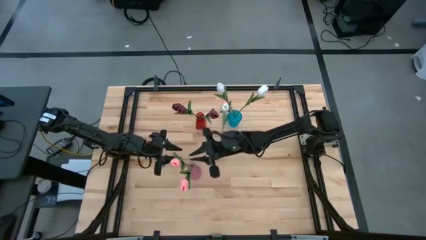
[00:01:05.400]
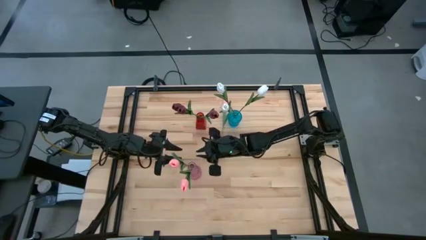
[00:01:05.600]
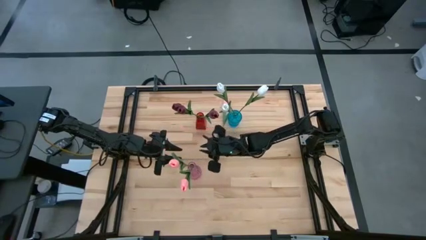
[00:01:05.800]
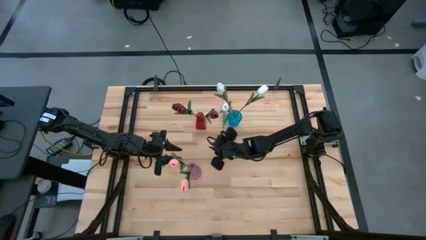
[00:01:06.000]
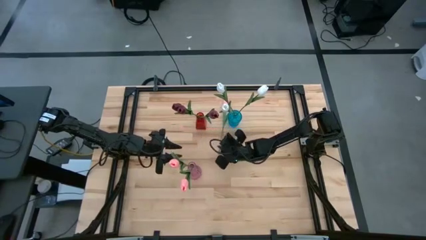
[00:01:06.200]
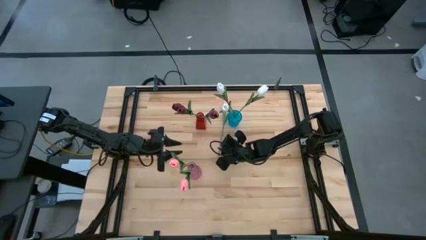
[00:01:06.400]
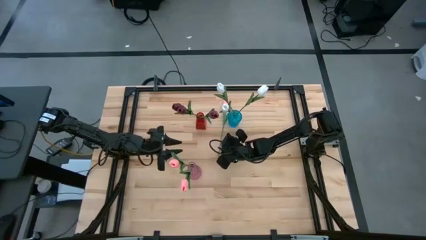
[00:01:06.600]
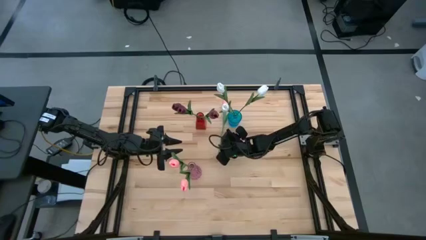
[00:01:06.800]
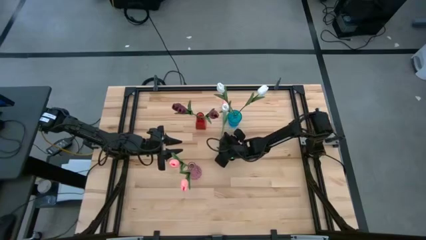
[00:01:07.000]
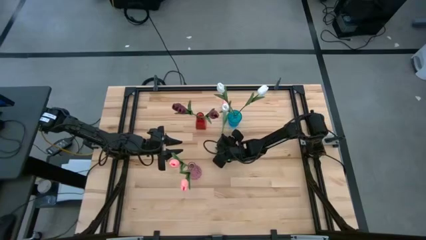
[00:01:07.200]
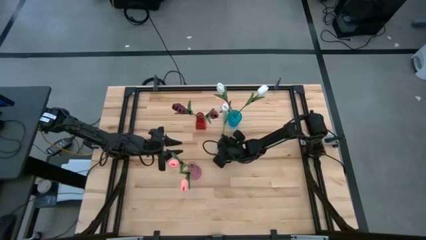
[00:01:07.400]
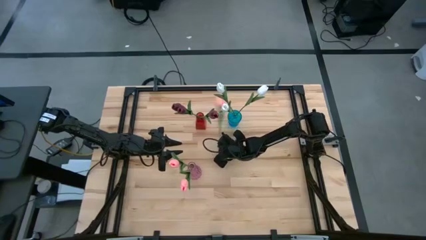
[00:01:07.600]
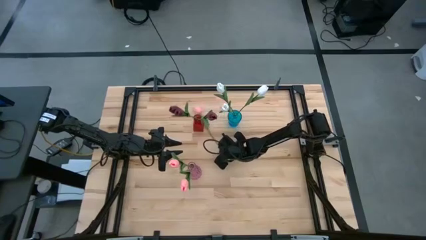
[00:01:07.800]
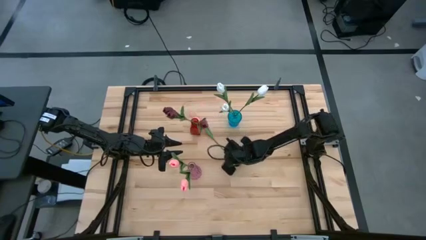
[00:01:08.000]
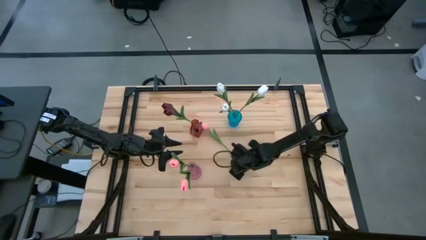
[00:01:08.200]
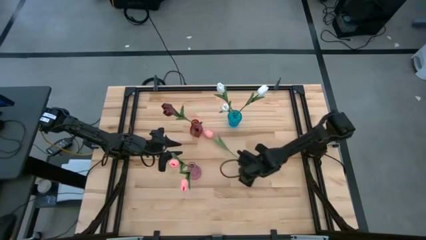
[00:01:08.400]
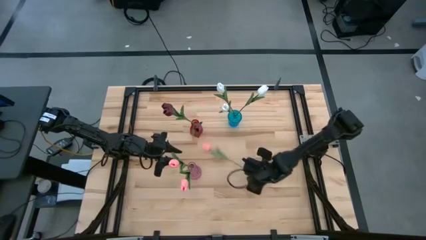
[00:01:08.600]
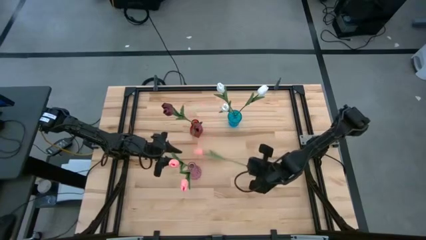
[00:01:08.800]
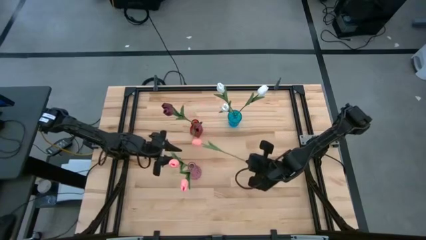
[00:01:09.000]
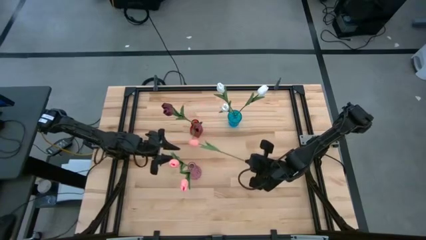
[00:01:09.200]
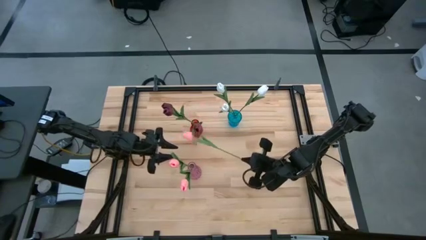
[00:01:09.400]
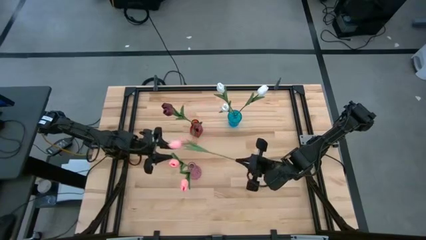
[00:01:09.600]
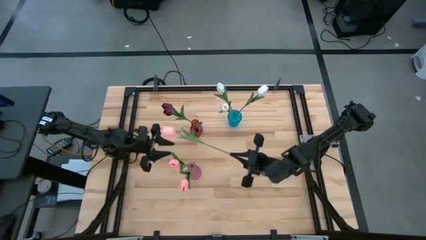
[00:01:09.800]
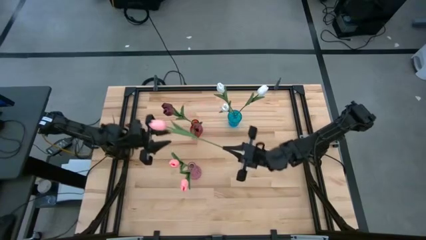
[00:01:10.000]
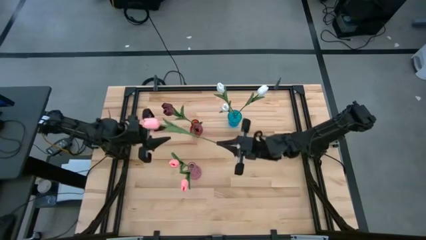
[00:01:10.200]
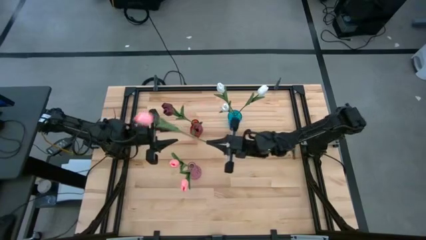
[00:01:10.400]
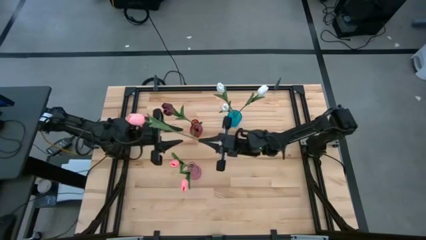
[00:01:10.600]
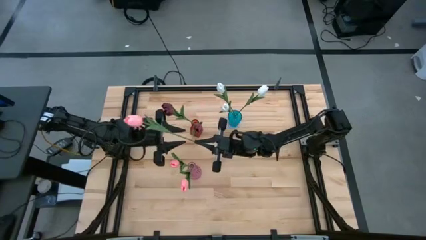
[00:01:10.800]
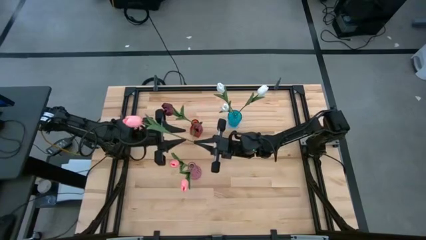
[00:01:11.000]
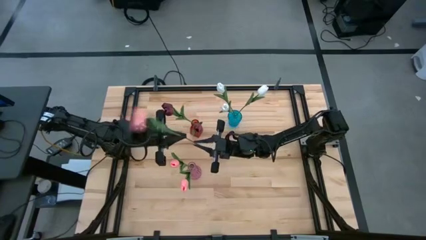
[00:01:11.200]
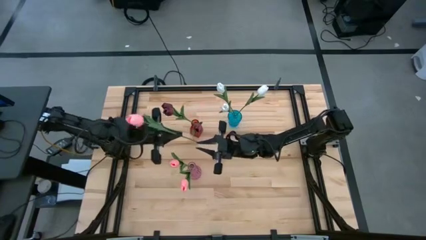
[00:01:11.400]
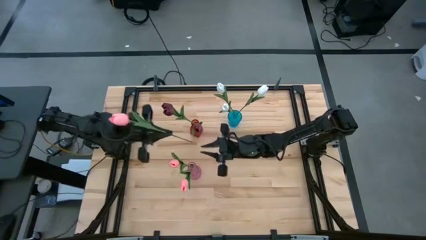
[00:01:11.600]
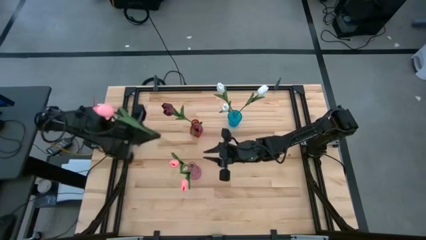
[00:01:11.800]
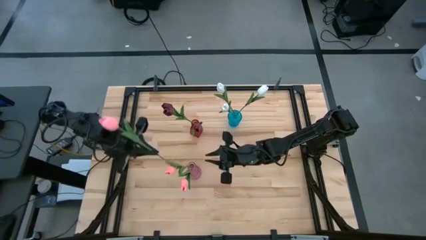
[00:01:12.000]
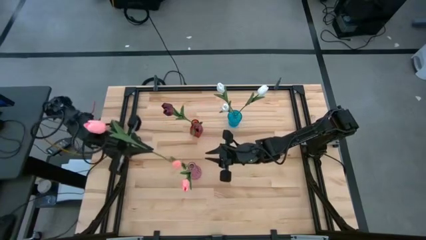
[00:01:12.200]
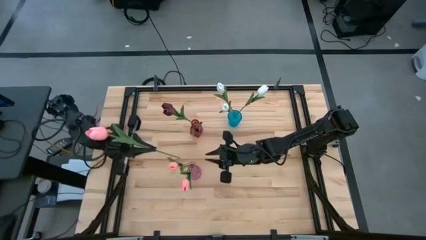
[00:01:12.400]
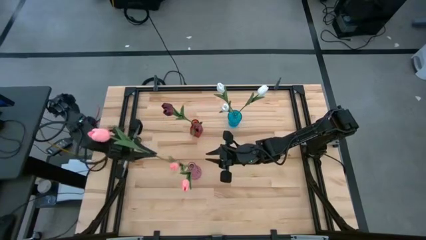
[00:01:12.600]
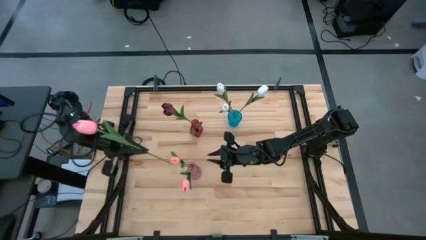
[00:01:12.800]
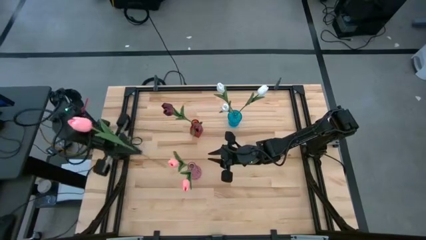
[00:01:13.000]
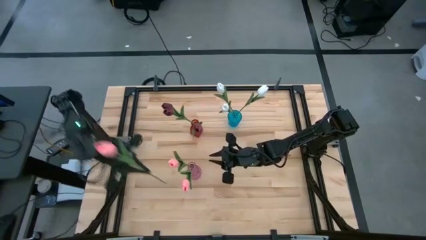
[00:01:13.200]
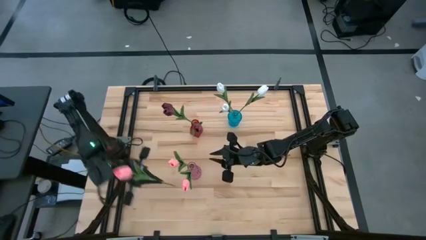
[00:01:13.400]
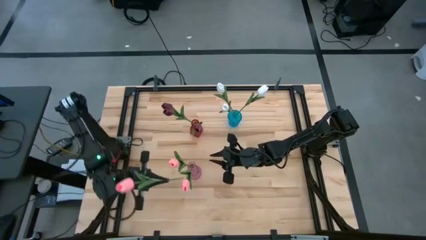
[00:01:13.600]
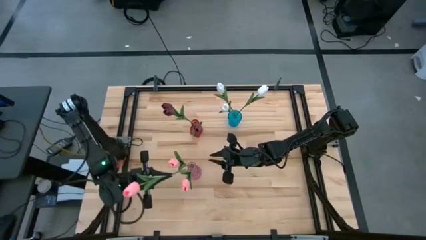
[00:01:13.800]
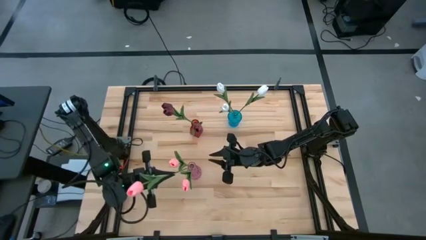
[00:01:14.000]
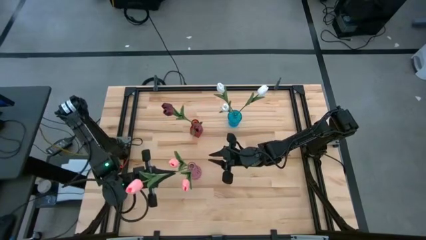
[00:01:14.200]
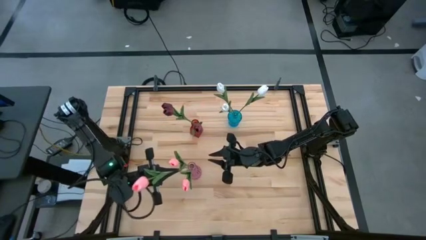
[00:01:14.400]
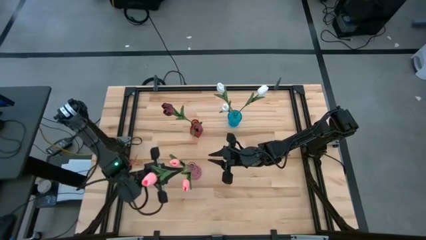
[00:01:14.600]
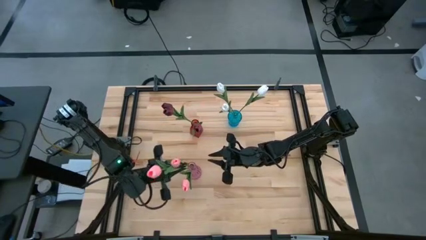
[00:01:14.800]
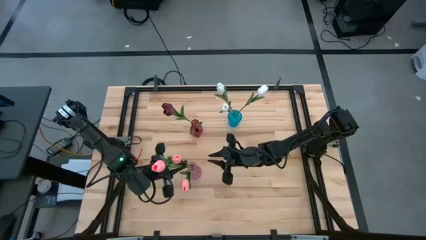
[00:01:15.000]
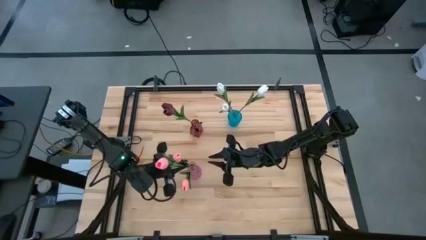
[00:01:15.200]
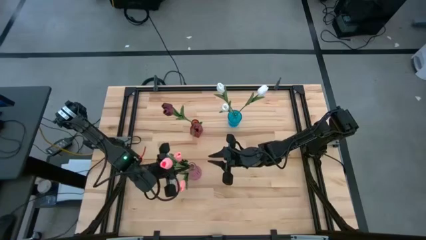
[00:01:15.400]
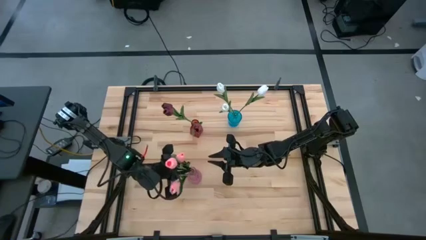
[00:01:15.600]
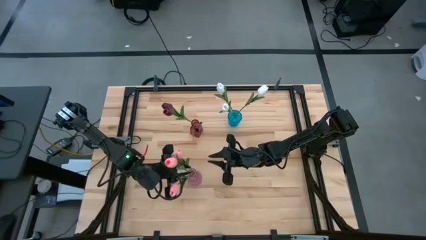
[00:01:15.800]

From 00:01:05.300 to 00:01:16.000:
Task: Sort flowers into vase by color
Put the pink flower into the pink vase

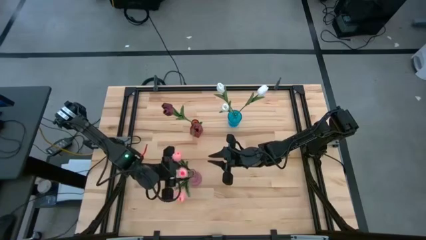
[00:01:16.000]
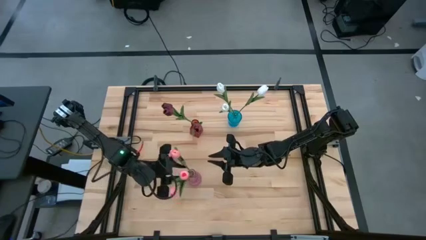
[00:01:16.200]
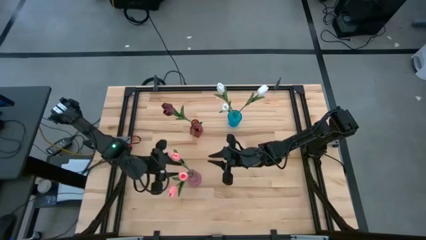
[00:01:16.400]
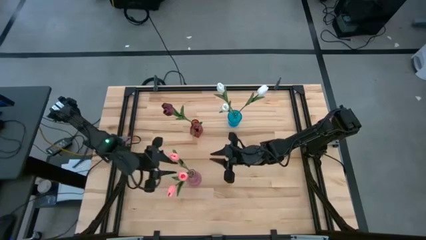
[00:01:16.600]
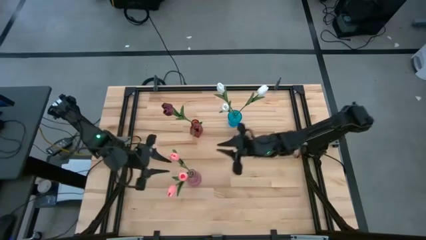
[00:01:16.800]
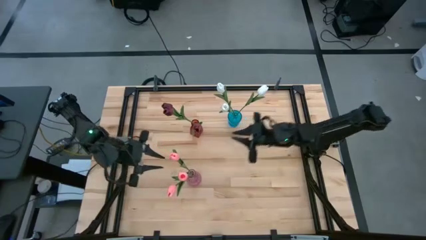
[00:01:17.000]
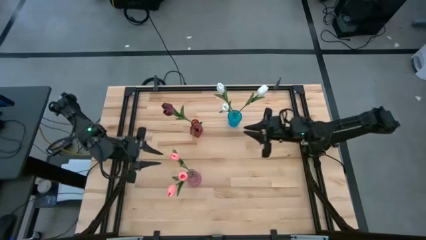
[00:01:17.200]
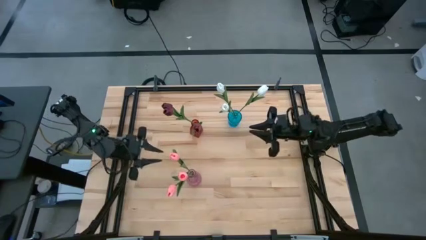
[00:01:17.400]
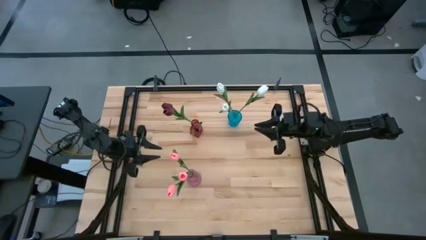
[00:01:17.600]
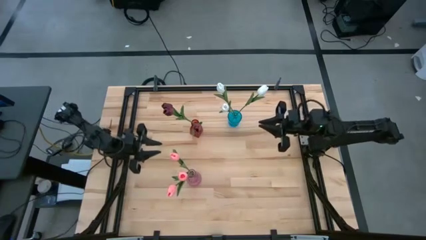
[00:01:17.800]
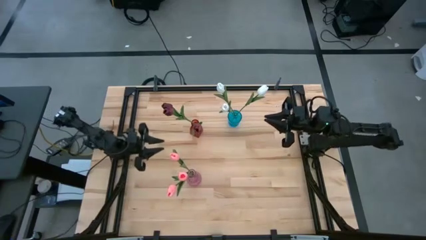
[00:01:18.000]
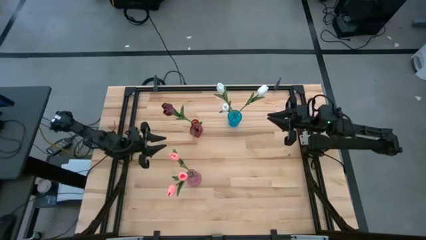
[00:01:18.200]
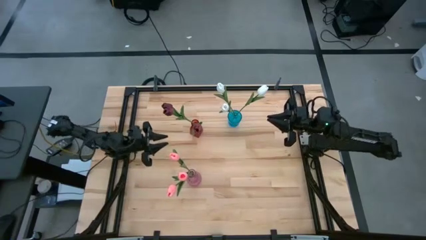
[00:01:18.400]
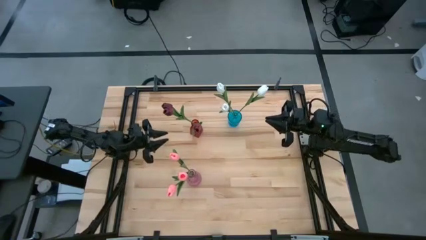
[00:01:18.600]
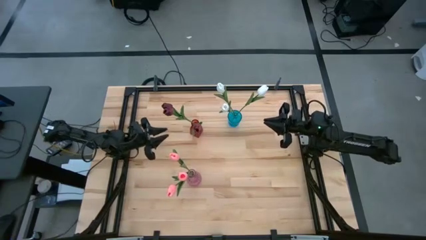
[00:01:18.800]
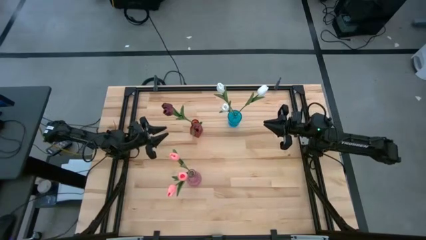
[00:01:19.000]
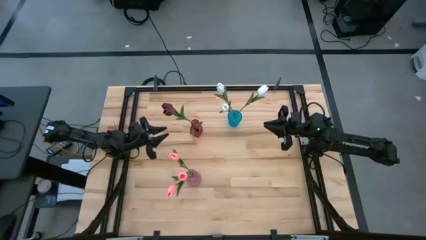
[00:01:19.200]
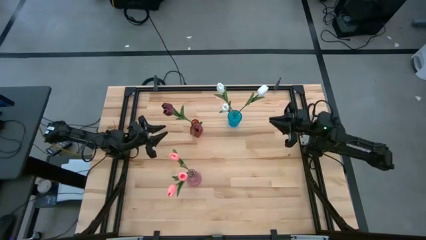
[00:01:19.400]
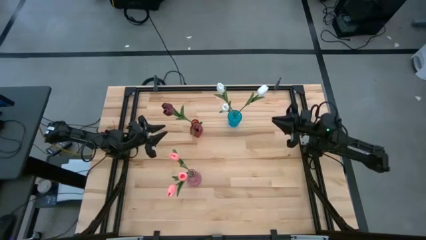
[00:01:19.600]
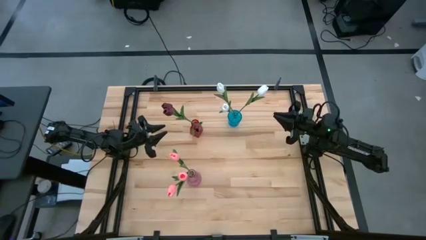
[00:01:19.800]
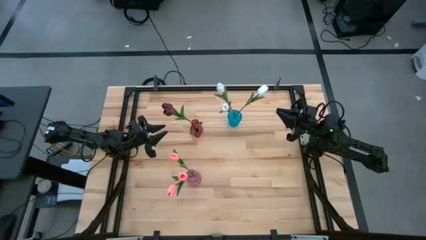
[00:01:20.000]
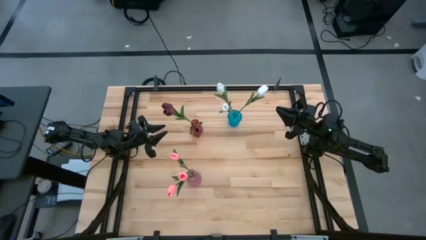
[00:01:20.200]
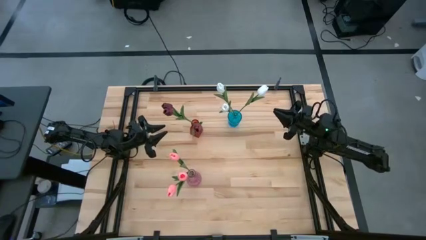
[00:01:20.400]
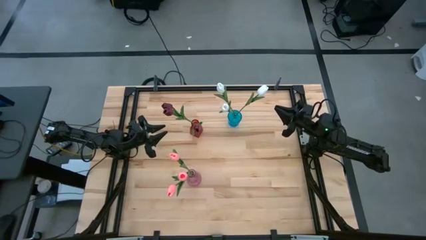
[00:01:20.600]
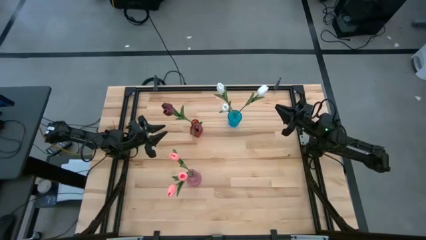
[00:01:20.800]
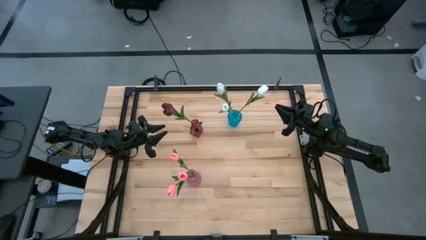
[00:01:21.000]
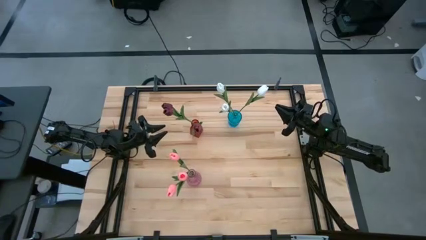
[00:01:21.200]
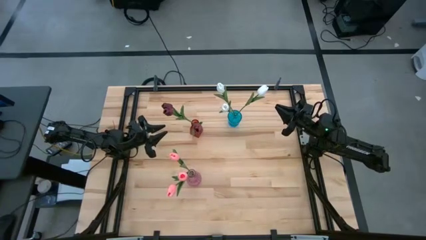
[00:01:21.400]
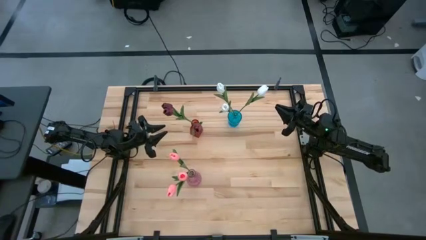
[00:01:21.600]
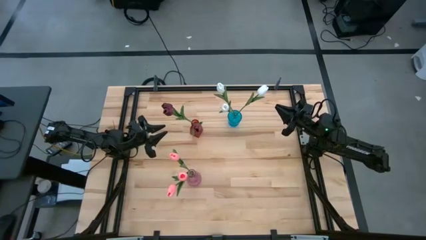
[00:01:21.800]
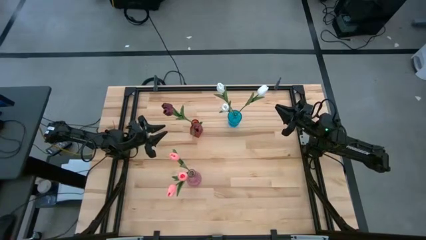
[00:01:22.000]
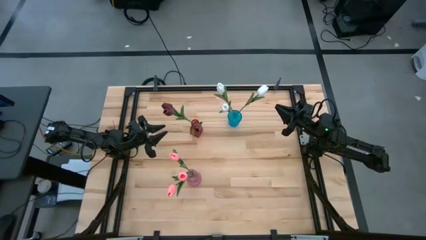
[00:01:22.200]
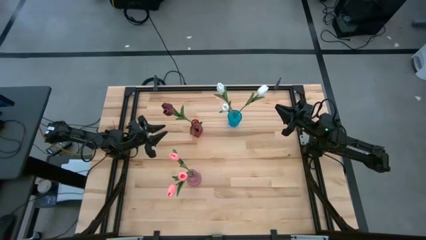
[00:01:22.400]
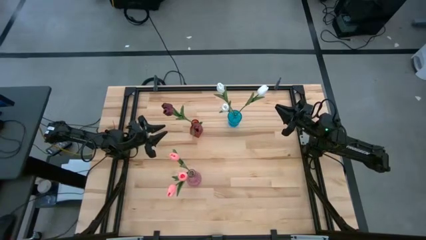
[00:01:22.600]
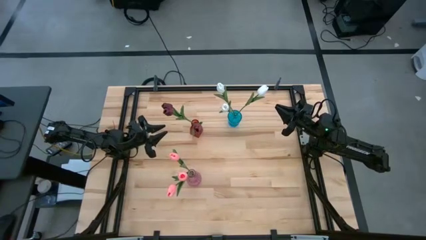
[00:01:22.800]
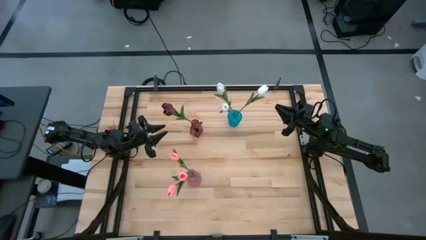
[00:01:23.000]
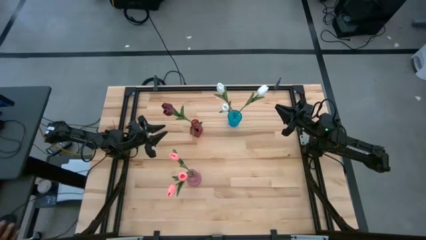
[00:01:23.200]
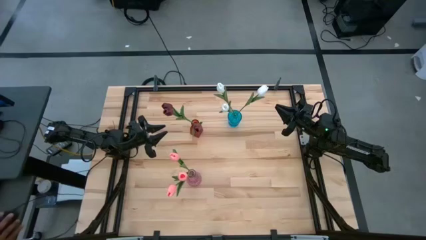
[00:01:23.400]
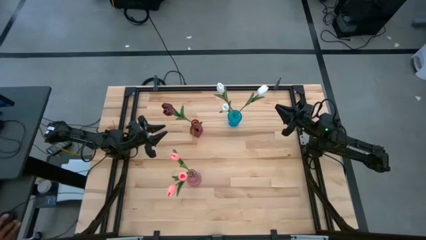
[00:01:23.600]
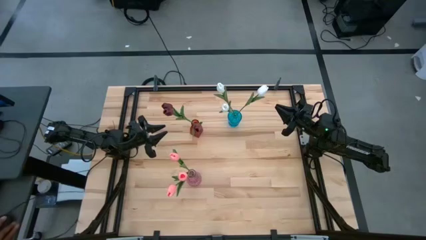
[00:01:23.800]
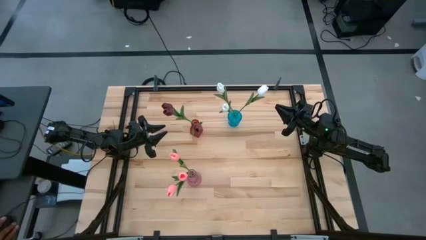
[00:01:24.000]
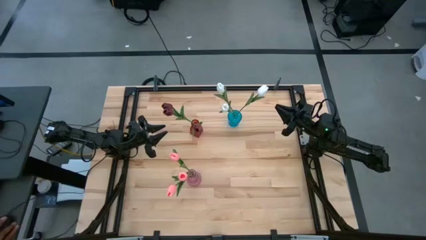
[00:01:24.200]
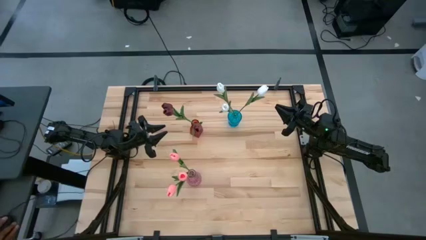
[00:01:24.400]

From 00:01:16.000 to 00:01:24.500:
Return to Home Position
